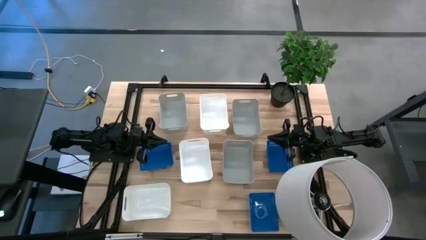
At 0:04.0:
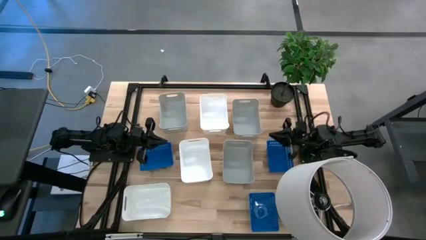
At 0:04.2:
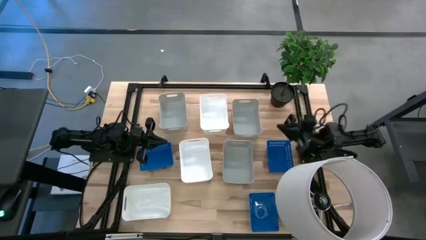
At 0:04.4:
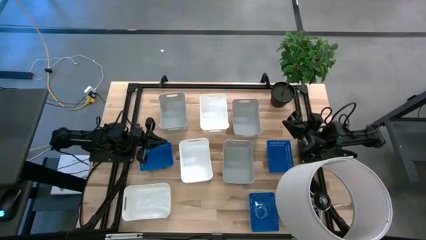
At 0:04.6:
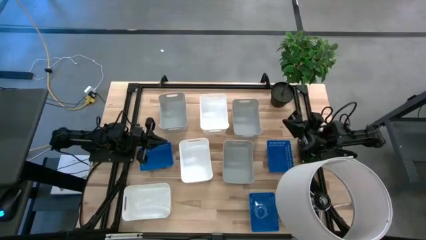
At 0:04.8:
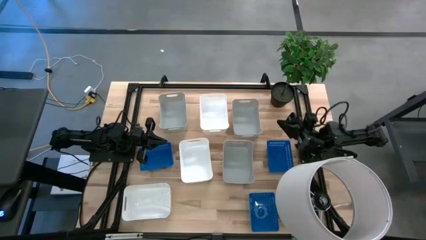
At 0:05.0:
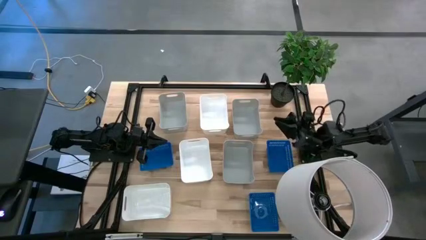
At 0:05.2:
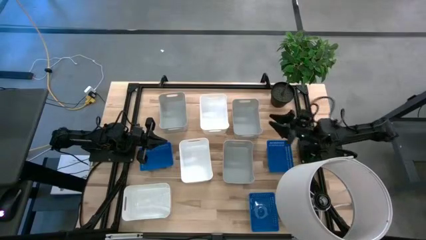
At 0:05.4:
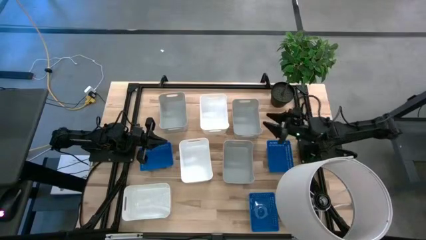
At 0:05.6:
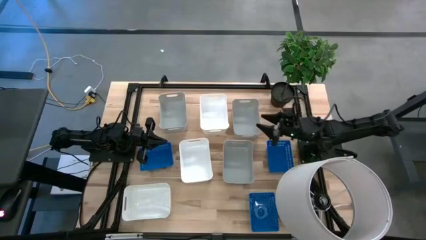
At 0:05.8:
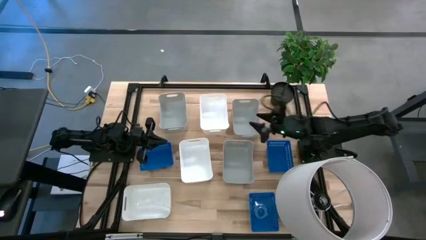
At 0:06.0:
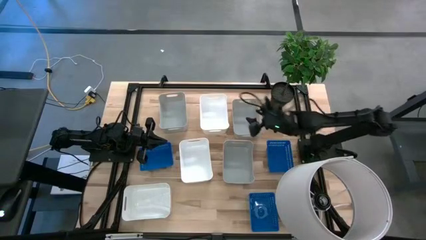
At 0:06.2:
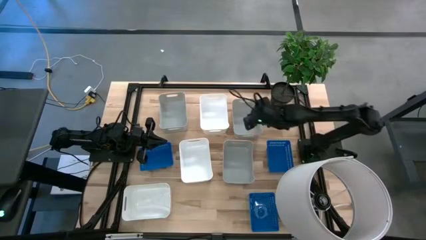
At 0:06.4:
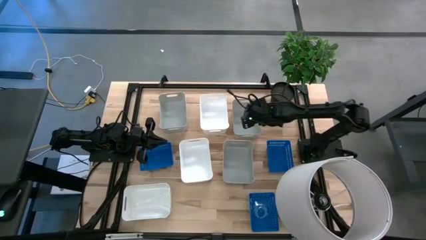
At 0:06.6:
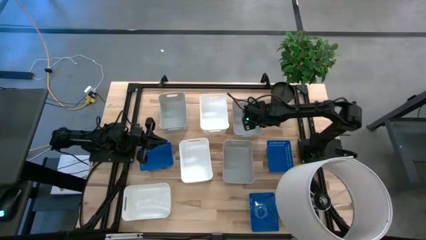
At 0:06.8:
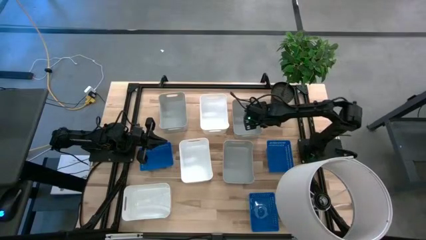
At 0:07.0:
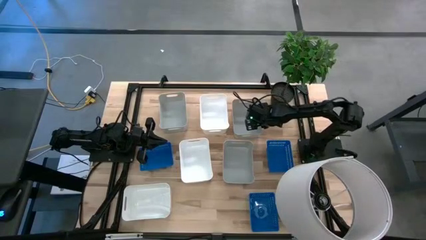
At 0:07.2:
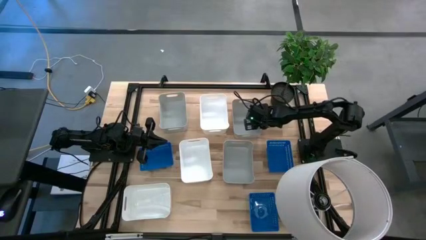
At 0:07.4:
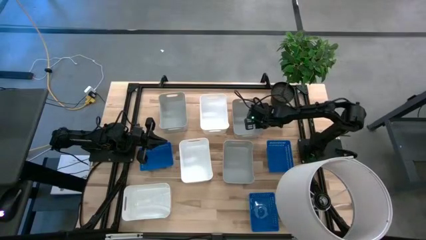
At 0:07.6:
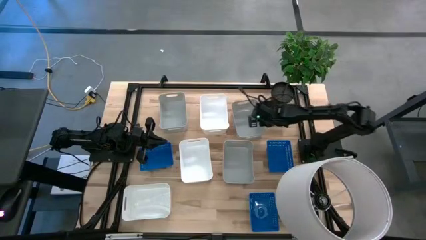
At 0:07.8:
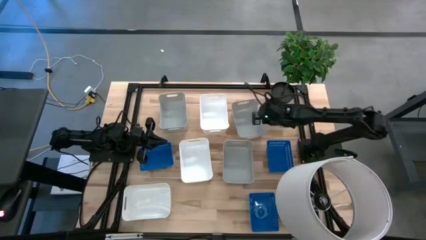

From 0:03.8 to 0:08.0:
Stack the top right gray bin on top of the other bottom gray bin

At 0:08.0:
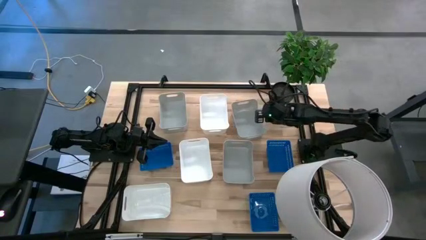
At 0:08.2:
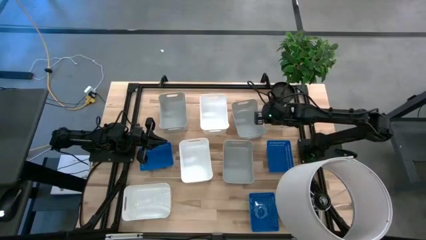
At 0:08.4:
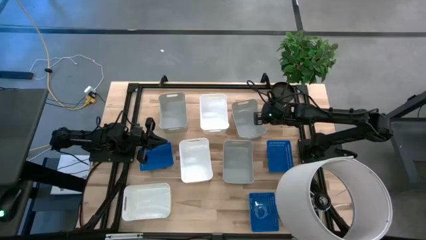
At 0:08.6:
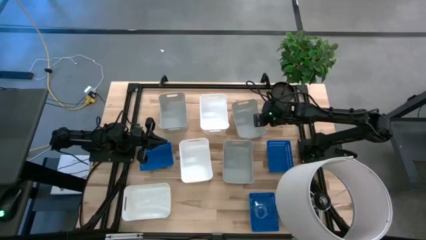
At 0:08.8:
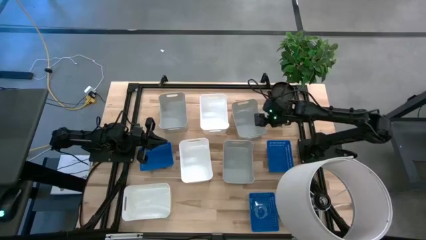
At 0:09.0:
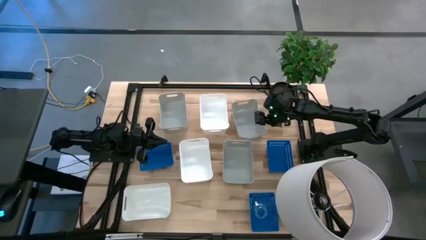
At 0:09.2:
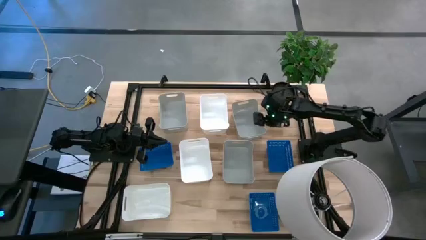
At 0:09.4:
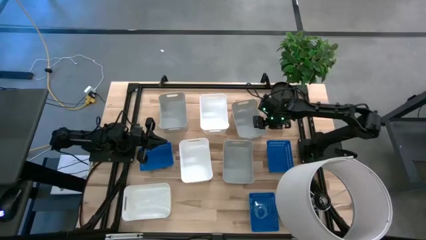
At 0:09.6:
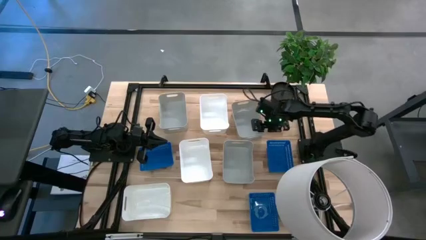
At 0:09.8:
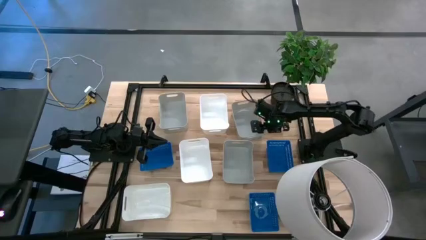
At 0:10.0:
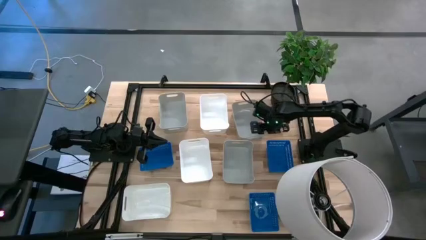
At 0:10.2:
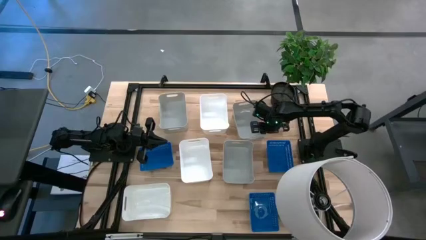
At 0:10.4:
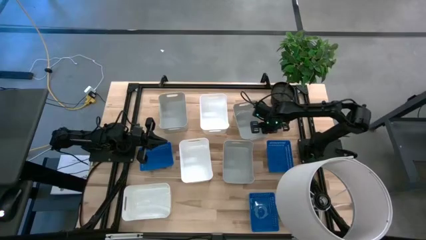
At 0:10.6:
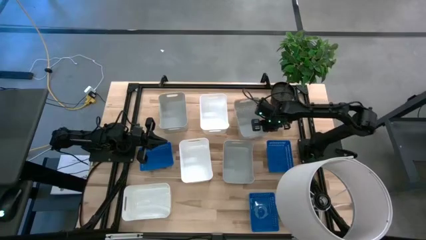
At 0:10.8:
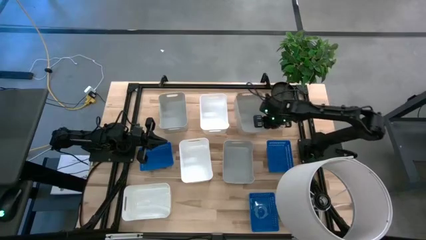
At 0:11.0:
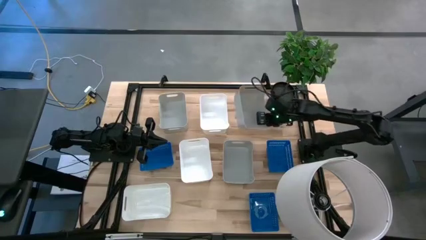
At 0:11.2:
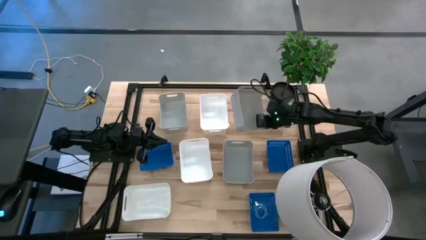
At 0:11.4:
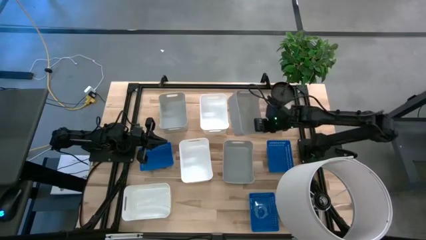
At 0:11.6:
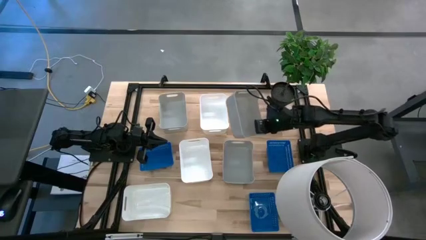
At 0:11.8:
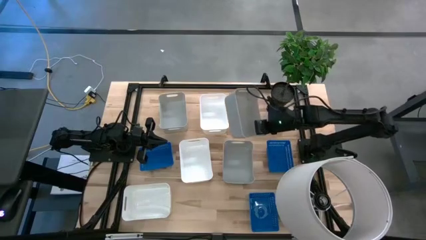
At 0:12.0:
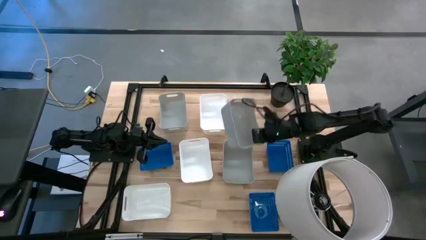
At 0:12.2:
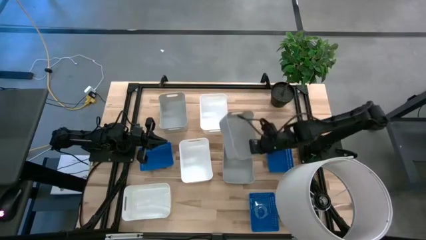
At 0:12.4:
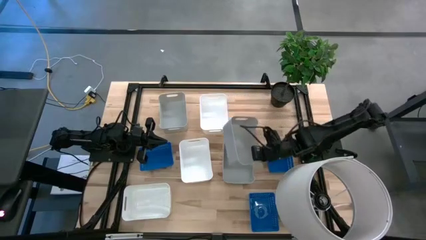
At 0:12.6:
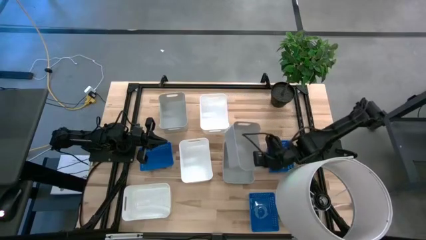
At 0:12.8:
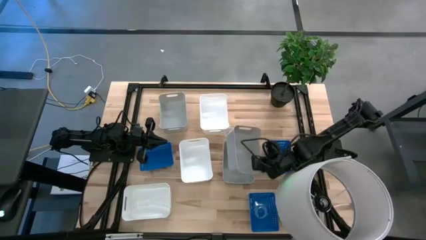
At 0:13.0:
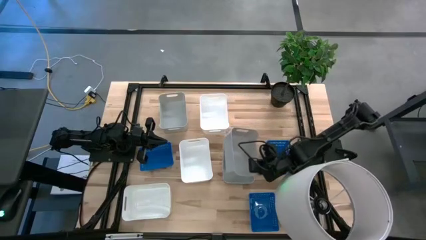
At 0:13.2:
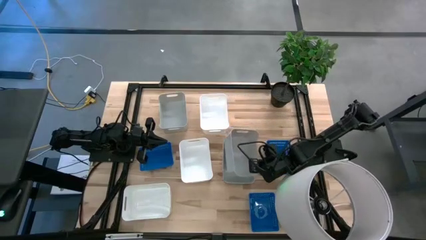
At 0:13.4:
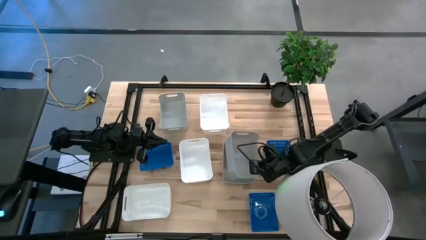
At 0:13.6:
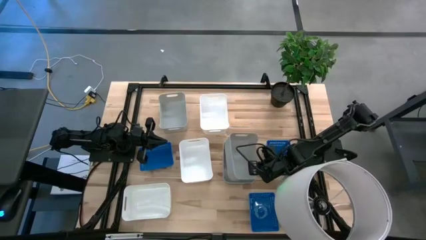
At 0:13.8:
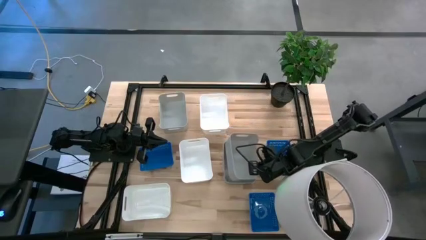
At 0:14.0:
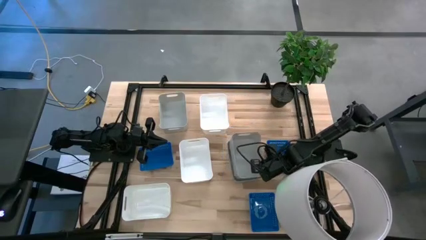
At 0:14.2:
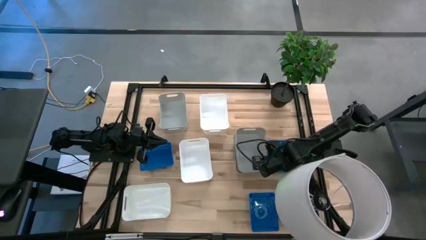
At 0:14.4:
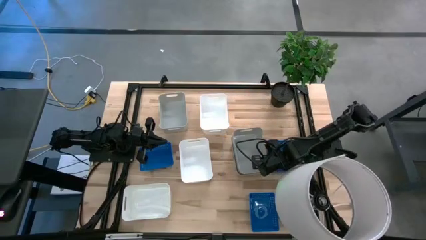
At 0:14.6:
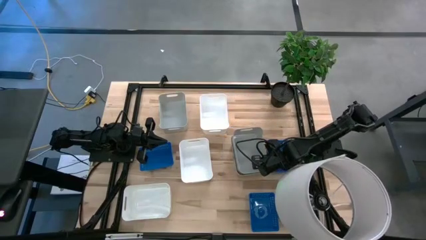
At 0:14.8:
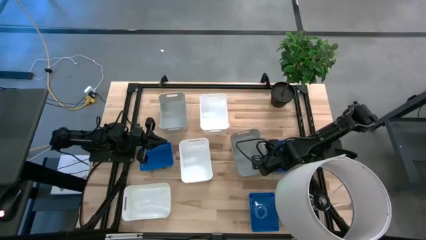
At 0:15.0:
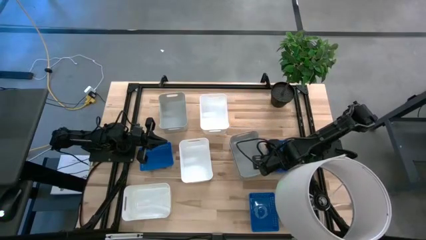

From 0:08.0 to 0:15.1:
Stack the top right gray bin on top of the other bottom gray bin

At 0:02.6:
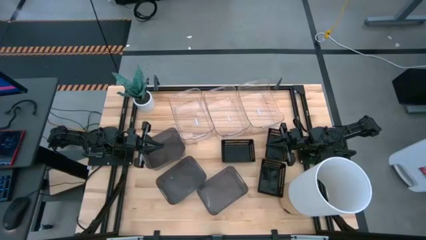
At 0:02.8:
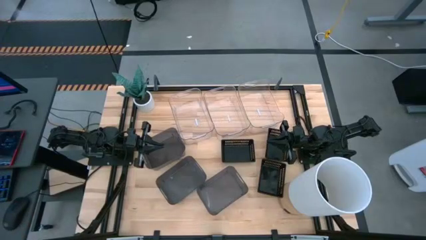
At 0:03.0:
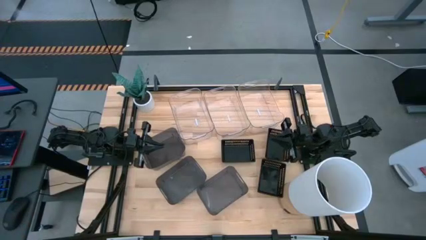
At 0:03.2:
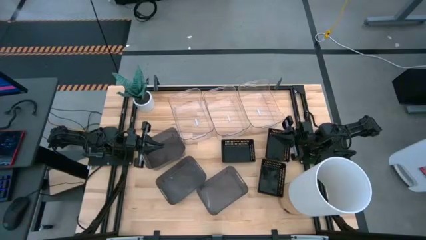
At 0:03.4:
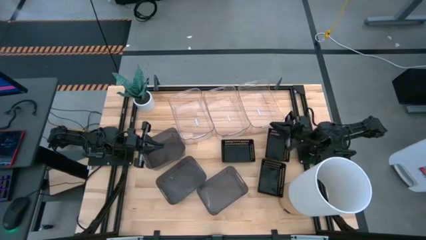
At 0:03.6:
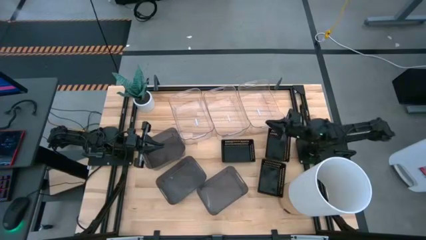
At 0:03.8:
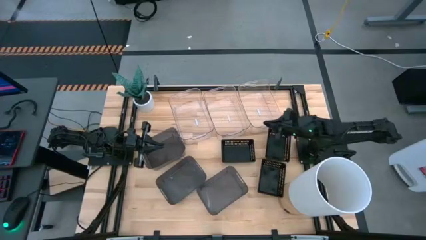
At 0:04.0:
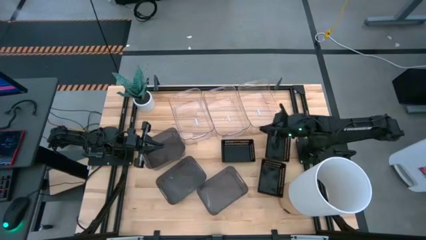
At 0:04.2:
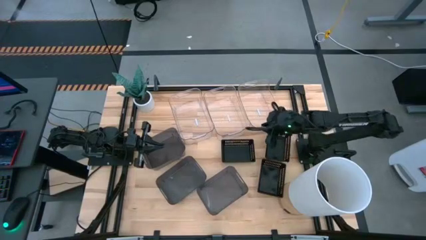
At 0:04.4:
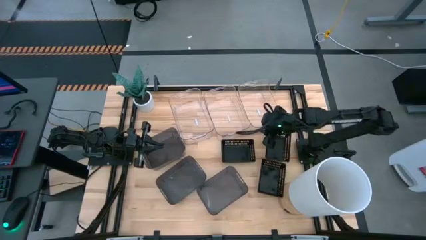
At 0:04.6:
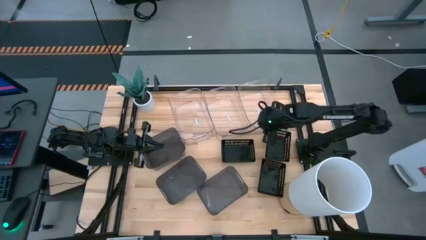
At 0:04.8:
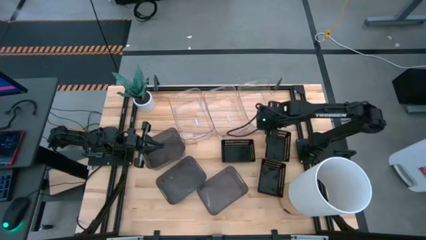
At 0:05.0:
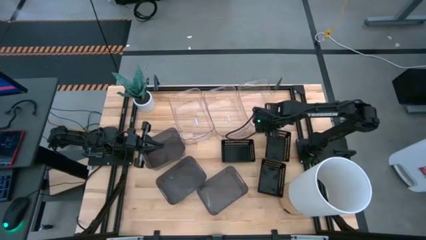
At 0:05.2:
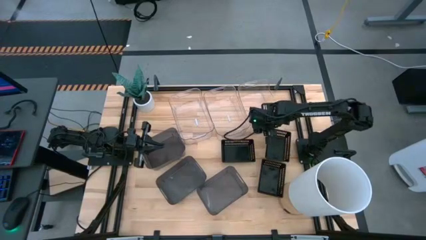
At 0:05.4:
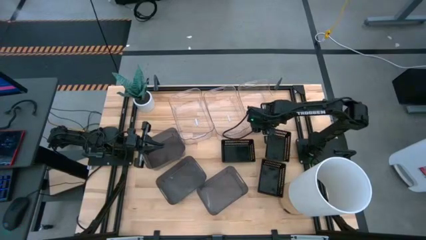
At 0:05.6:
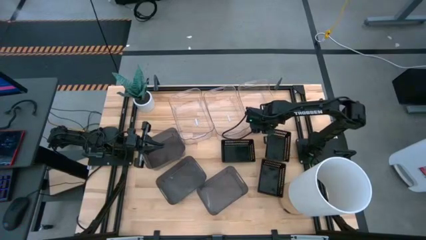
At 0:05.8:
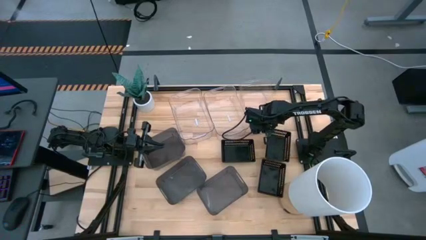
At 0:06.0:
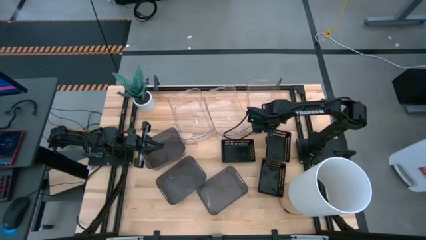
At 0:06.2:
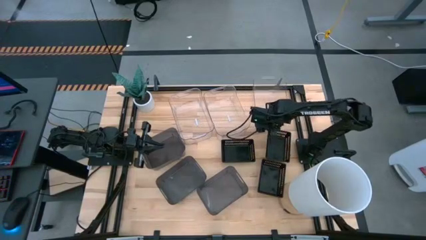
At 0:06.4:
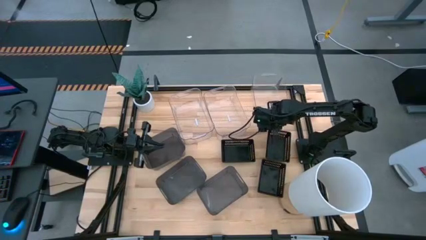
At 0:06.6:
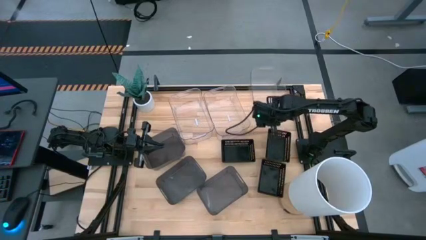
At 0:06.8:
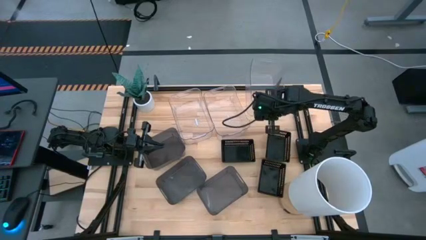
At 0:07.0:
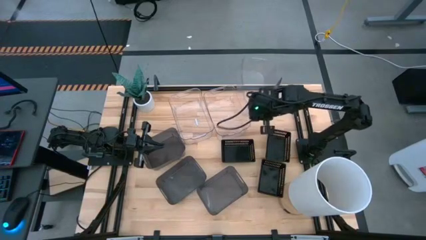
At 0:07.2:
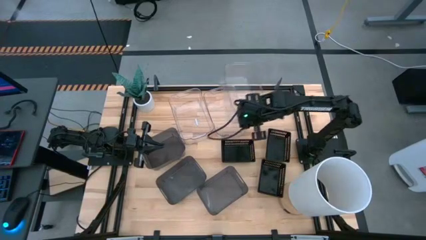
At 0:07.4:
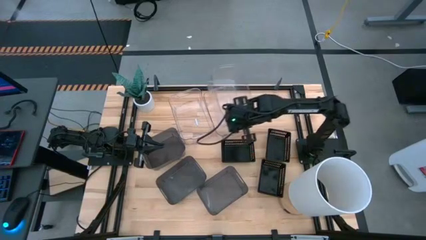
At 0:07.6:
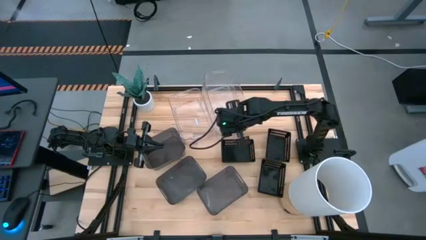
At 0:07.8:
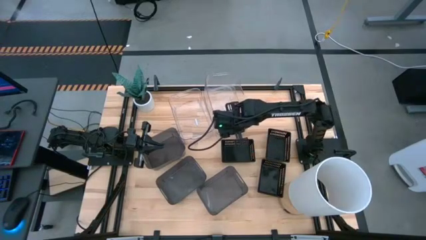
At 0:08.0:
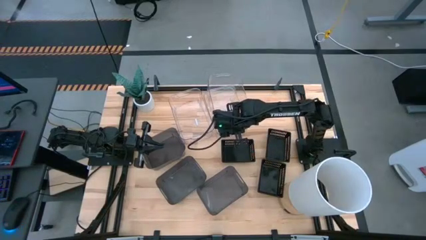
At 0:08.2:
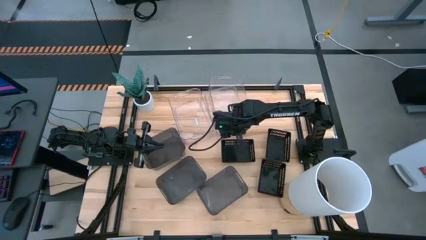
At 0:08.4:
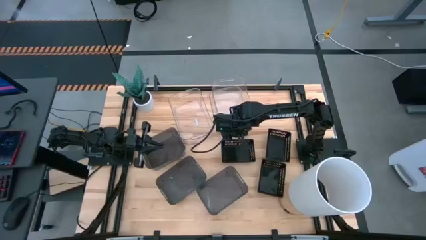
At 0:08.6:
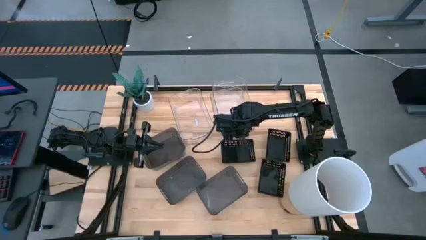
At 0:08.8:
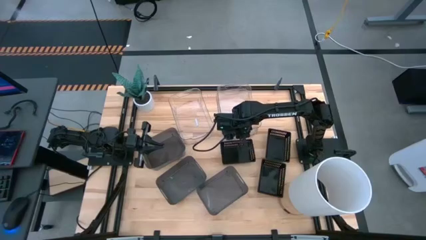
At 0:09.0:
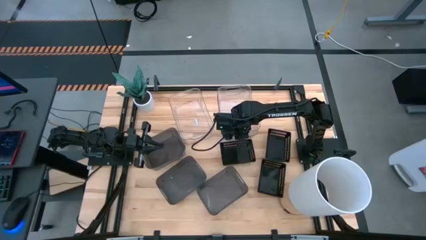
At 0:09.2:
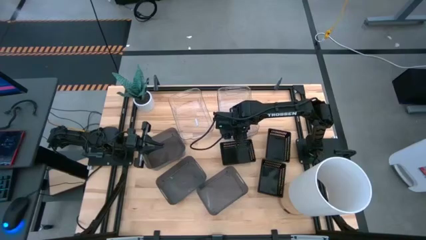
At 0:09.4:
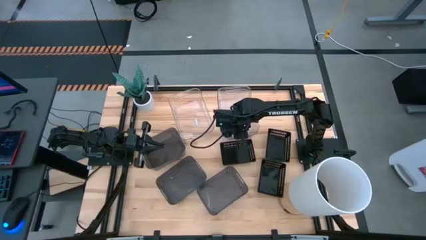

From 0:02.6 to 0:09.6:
Stack the right transparent bin on the top of the middle transparent bin
